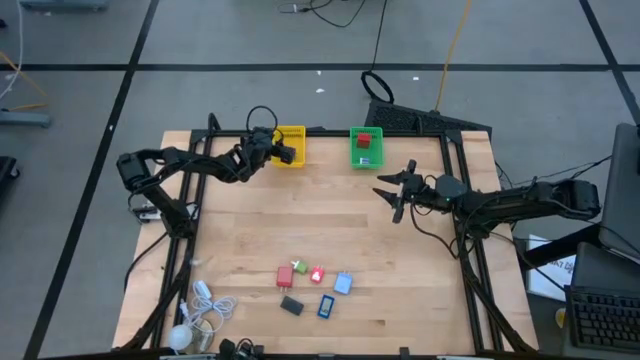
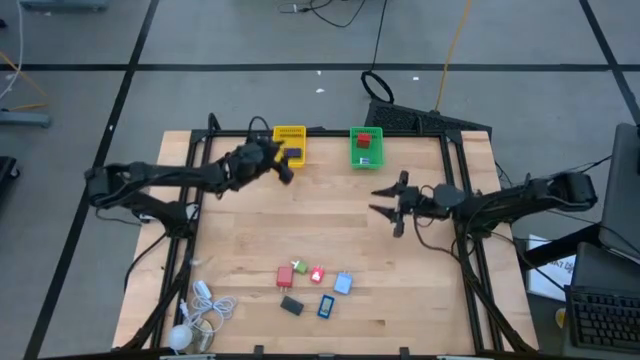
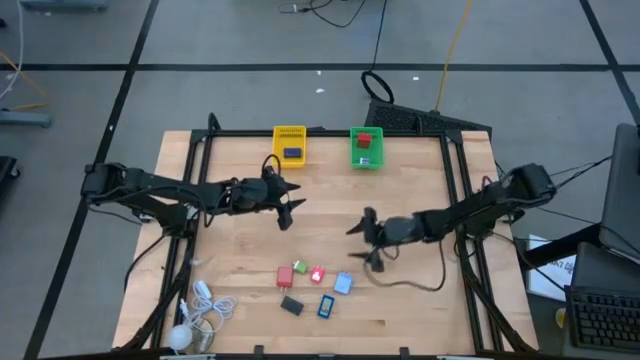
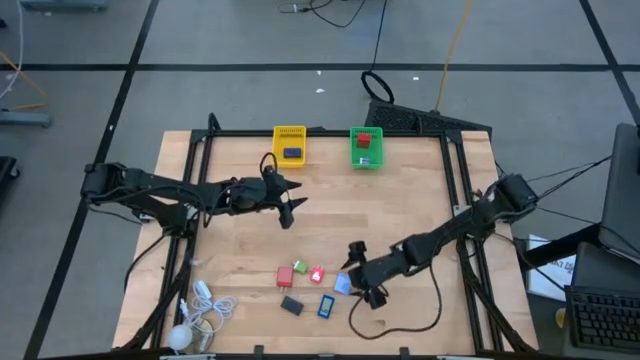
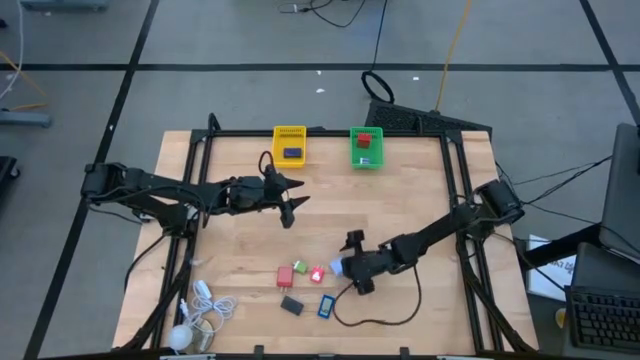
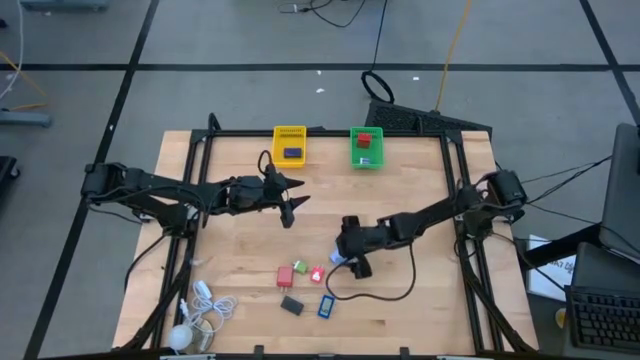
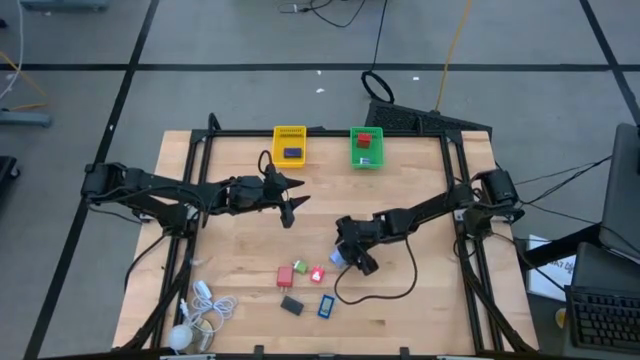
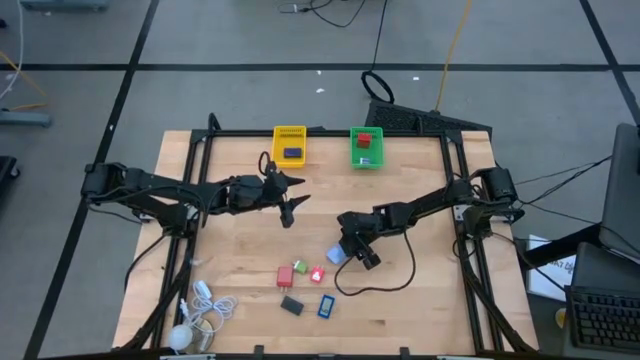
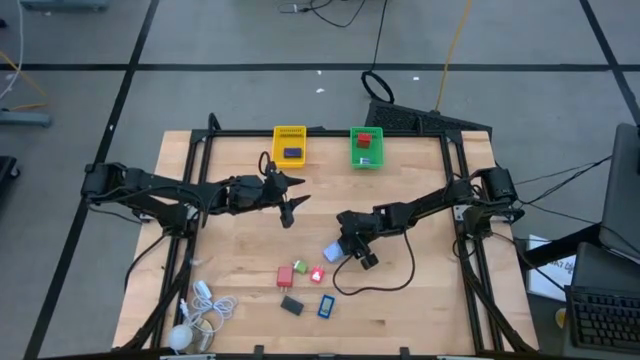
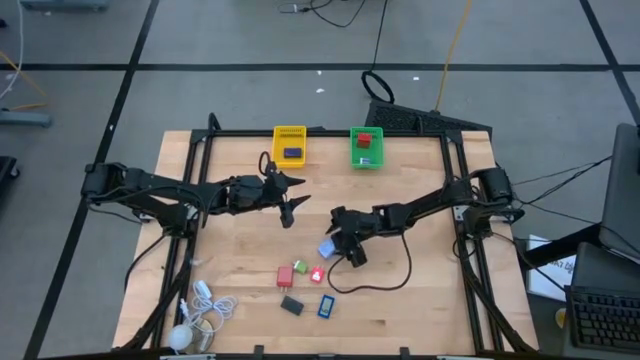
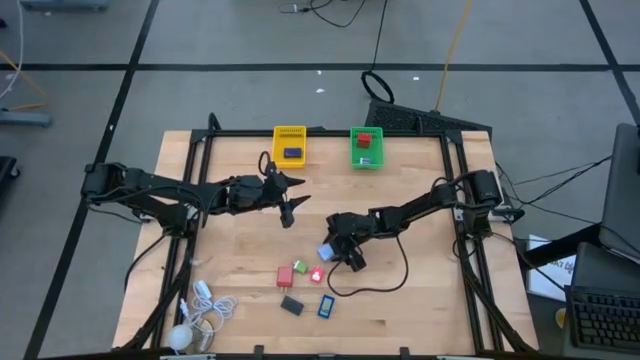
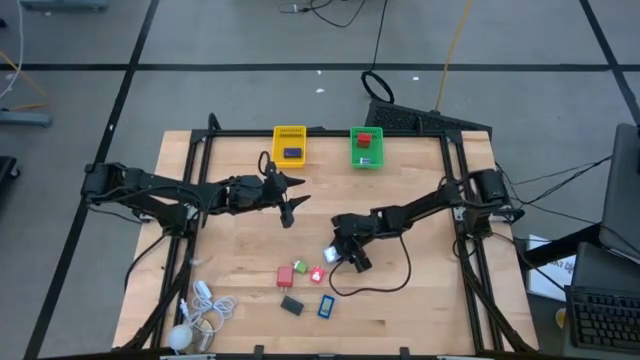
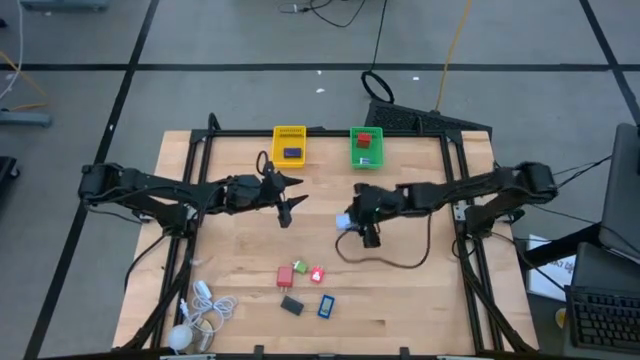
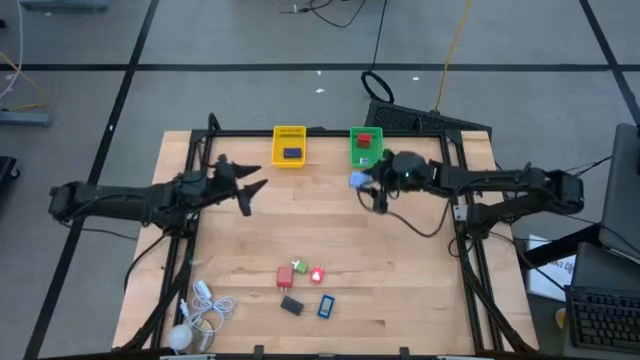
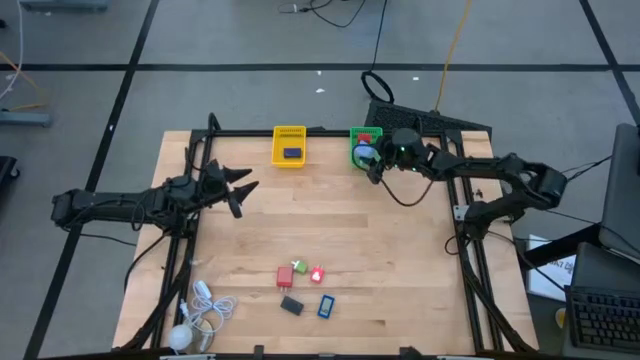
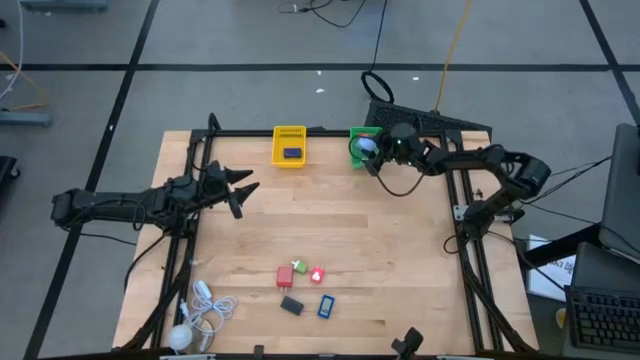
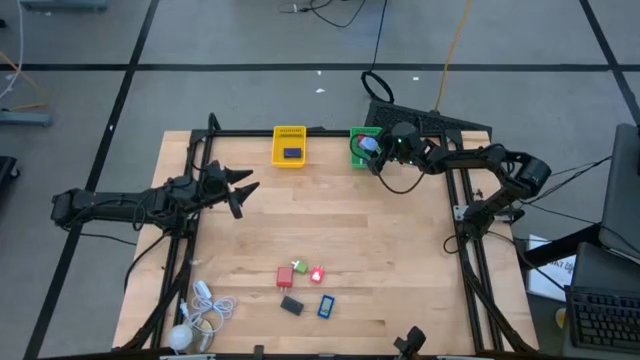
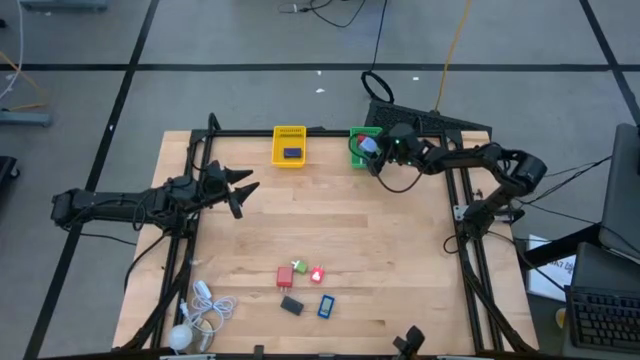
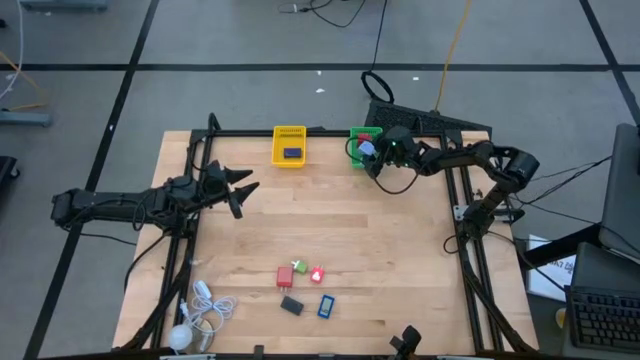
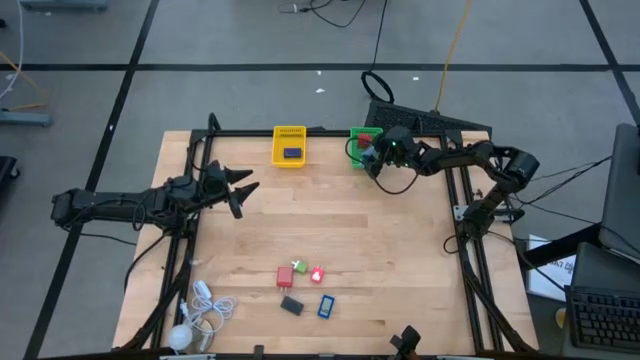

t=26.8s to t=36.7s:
Task: Pick & Place Office items
Put the purple charger adapter into the green bin

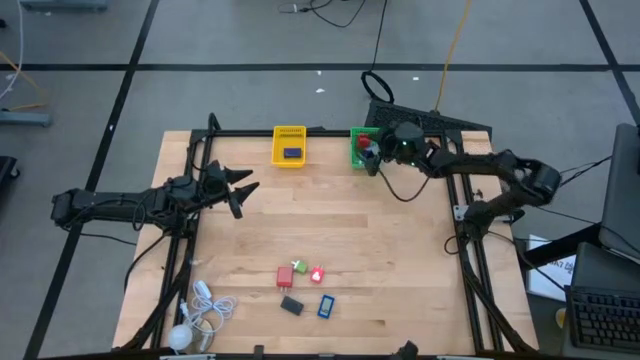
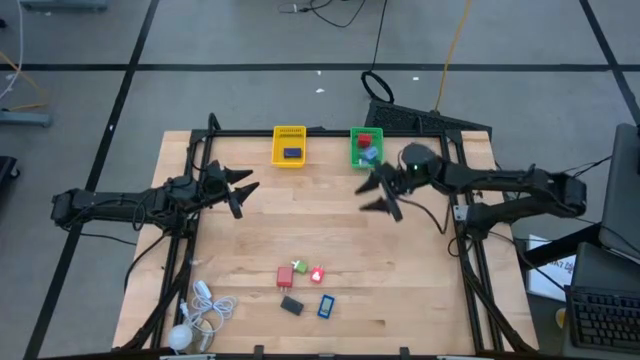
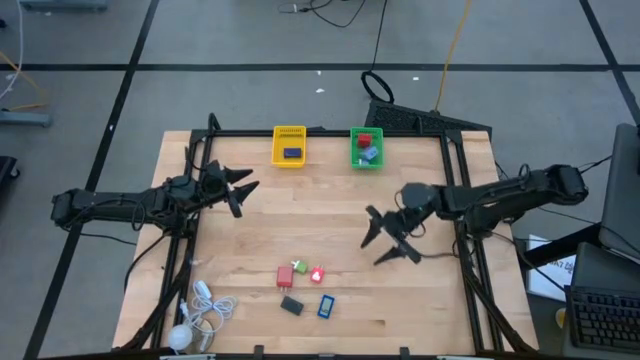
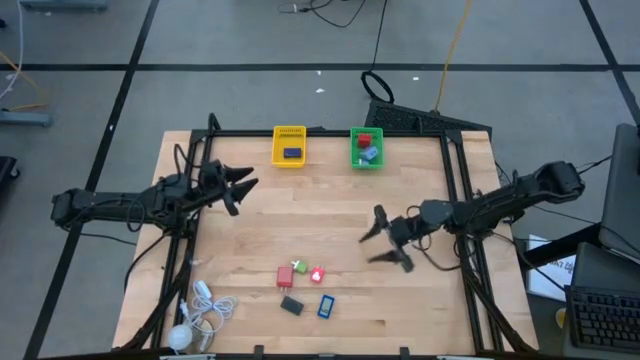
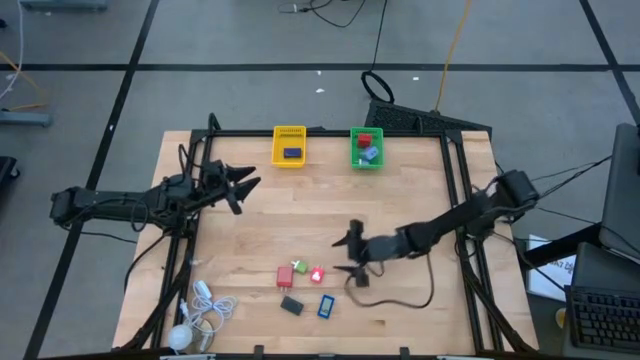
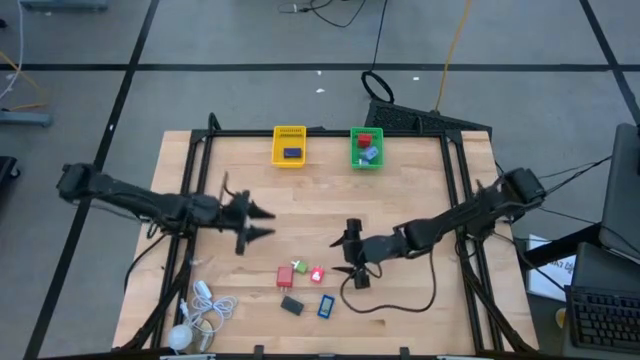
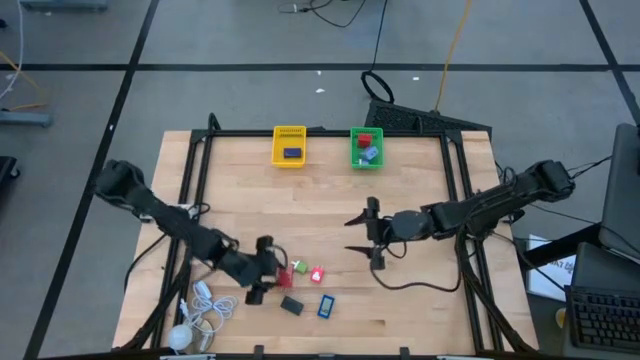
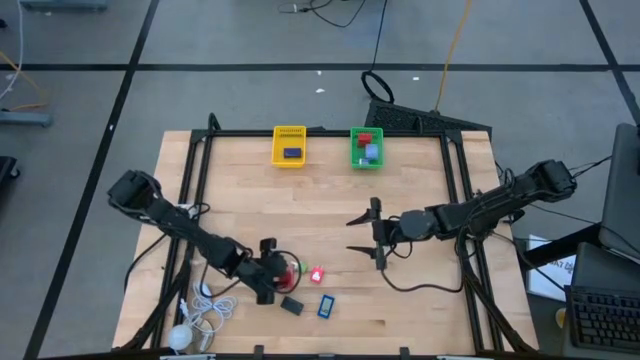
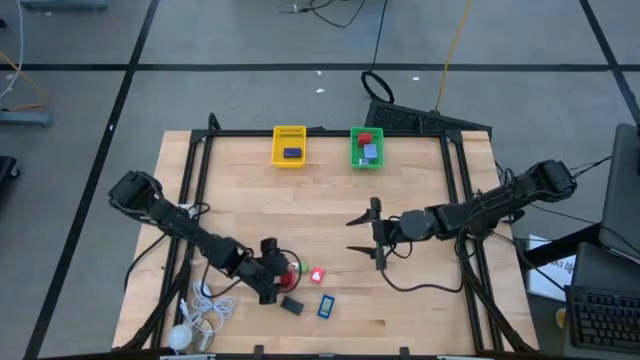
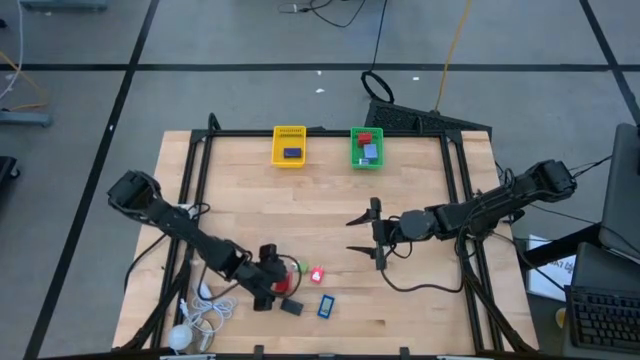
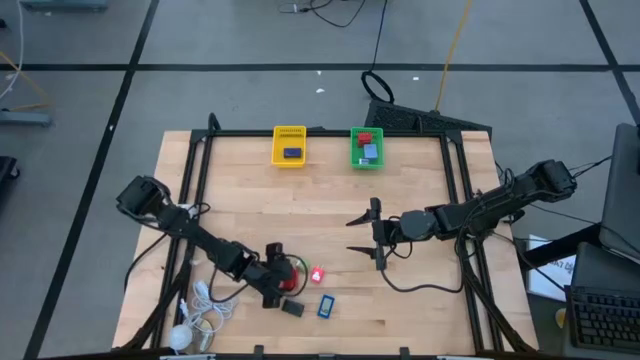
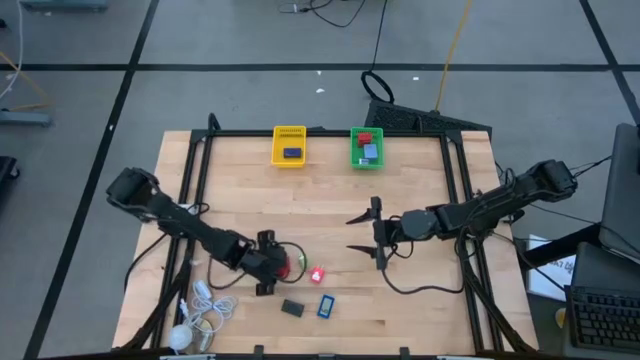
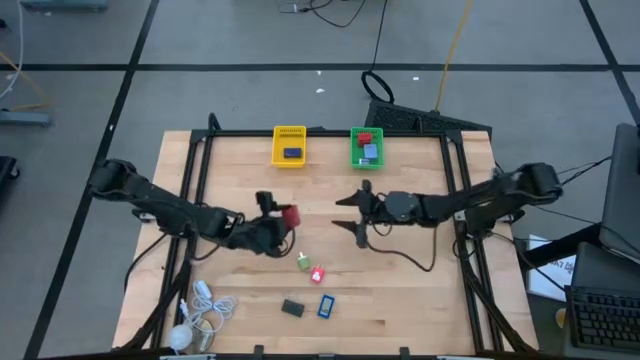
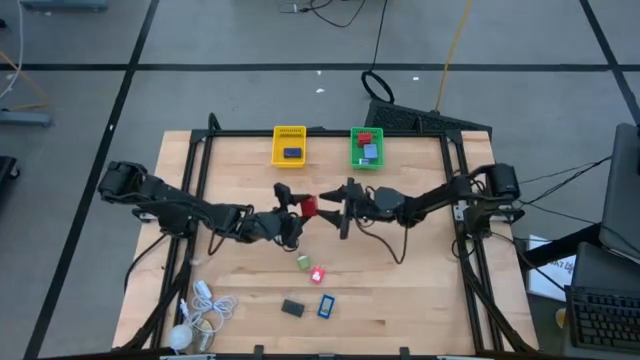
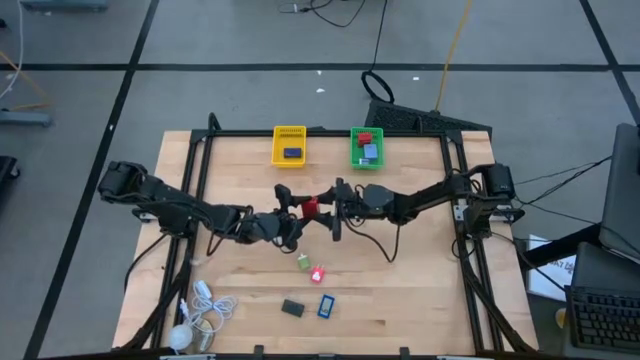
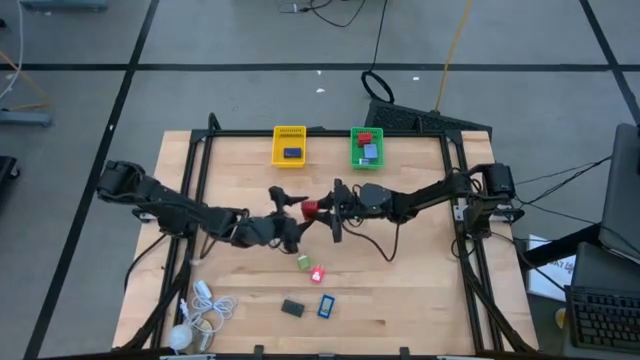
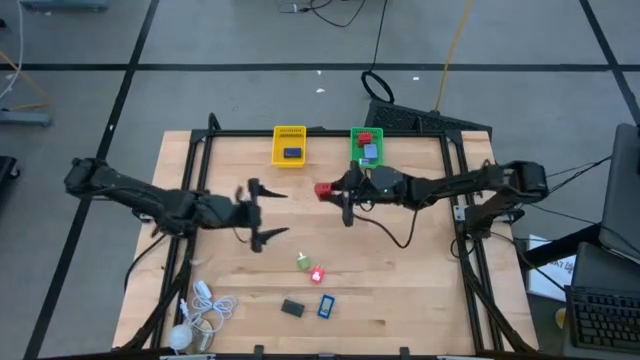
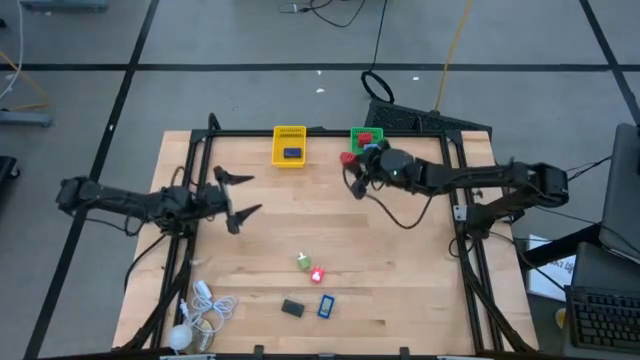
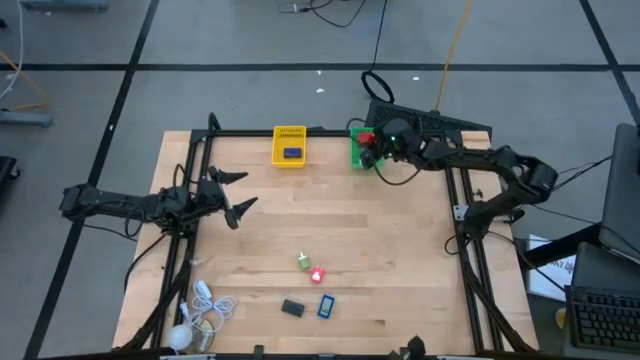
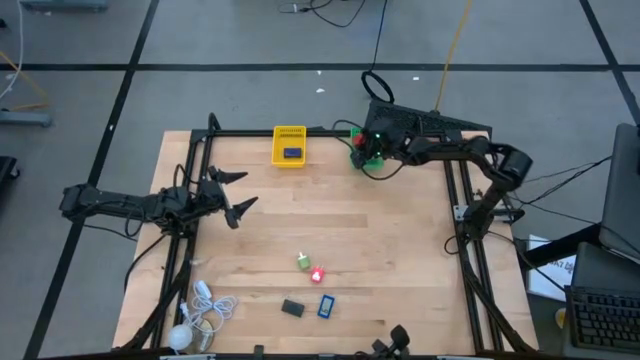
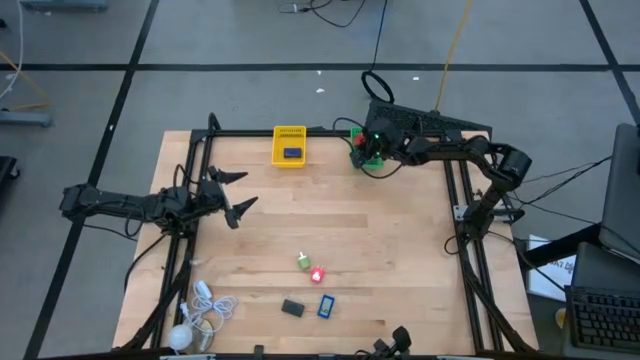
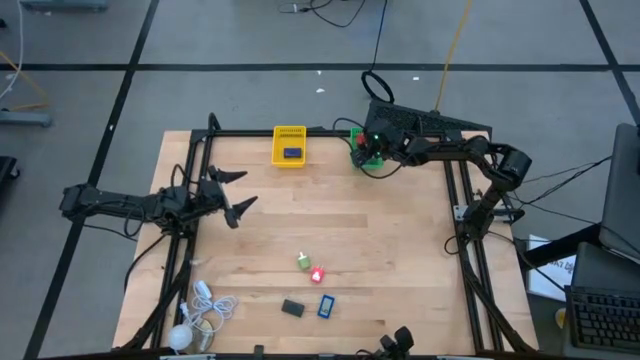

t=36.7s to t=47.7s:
Put the red charger adapter into the green bin
